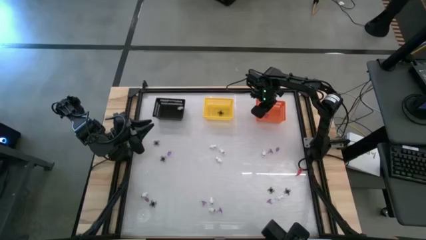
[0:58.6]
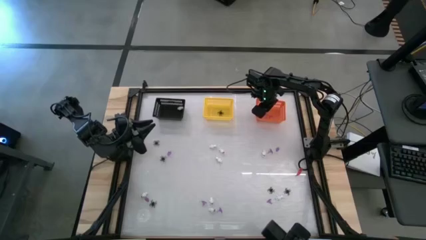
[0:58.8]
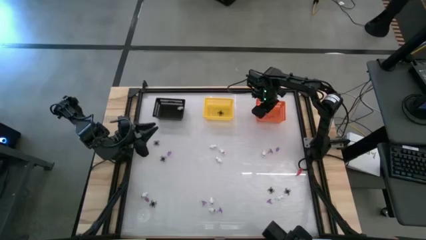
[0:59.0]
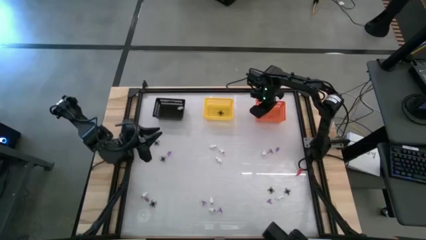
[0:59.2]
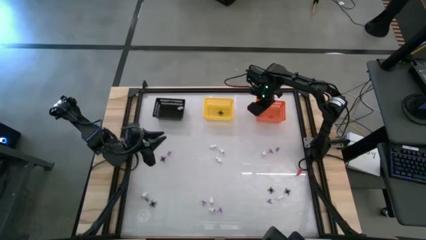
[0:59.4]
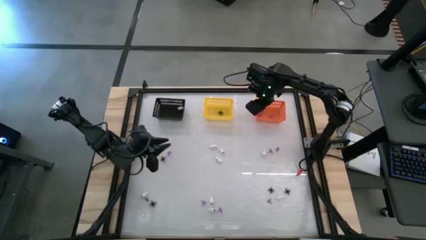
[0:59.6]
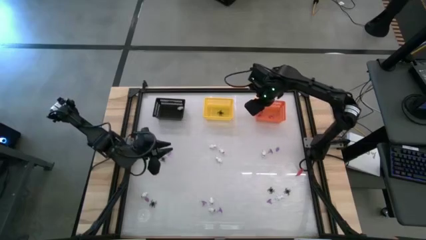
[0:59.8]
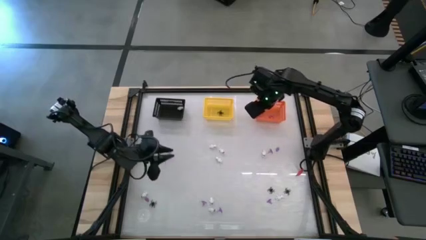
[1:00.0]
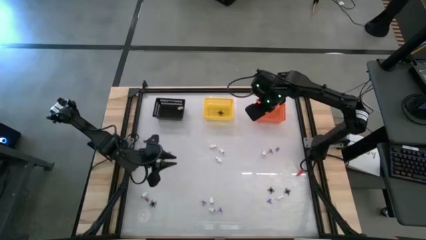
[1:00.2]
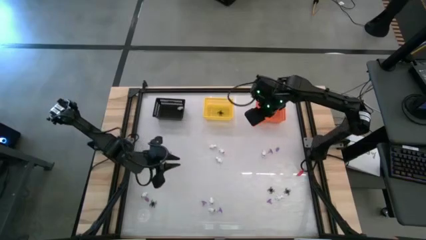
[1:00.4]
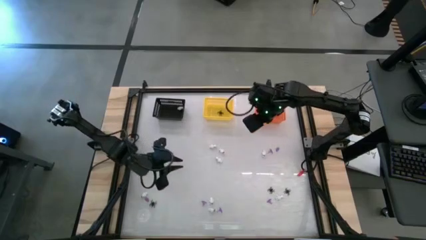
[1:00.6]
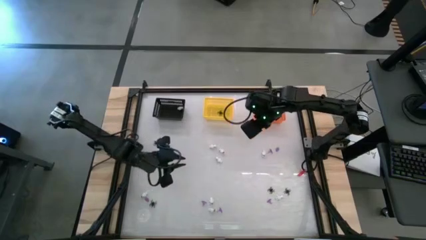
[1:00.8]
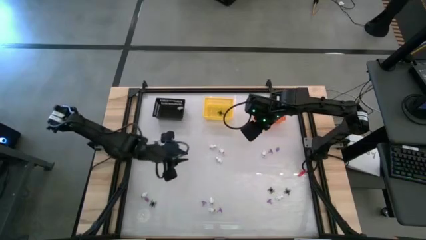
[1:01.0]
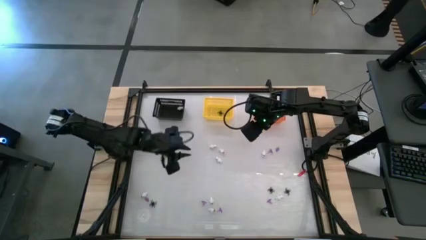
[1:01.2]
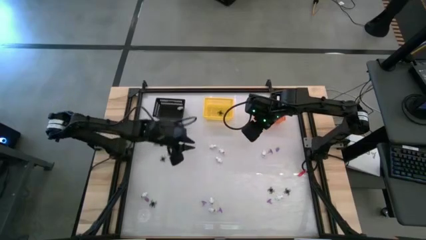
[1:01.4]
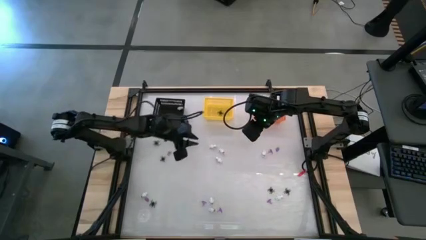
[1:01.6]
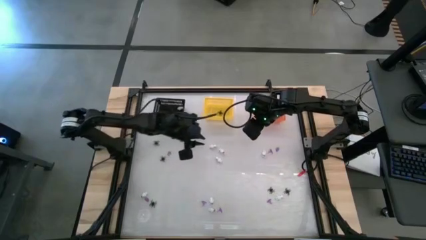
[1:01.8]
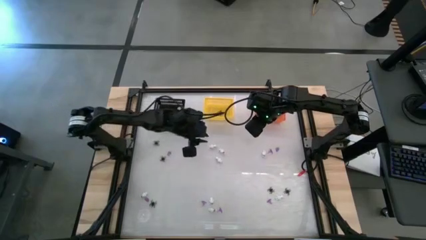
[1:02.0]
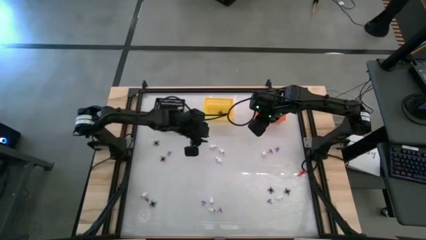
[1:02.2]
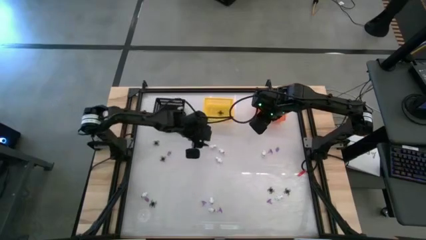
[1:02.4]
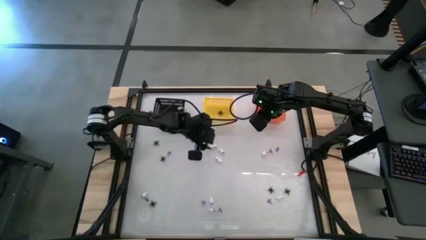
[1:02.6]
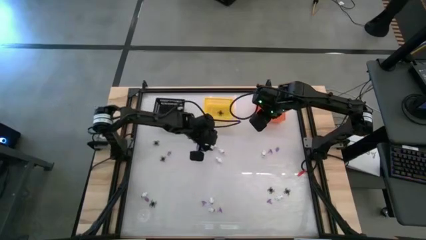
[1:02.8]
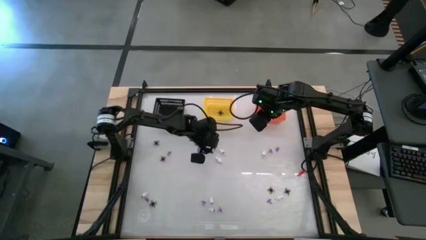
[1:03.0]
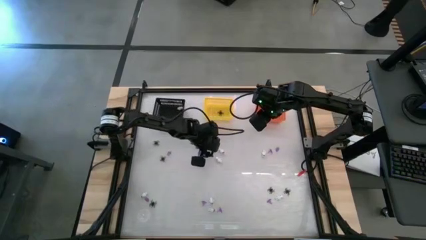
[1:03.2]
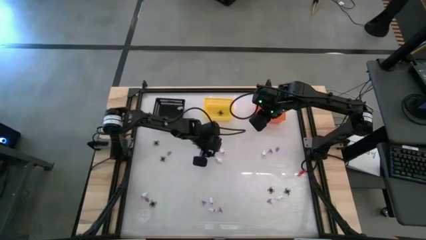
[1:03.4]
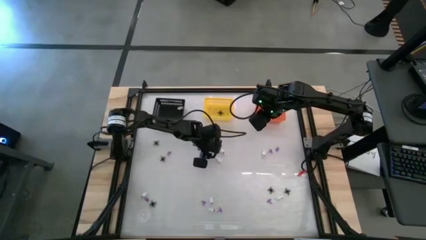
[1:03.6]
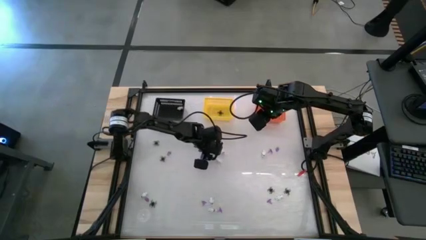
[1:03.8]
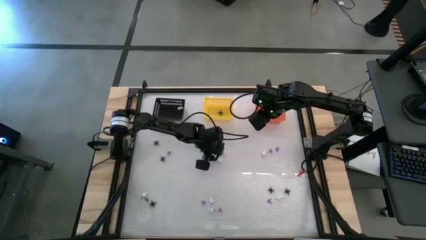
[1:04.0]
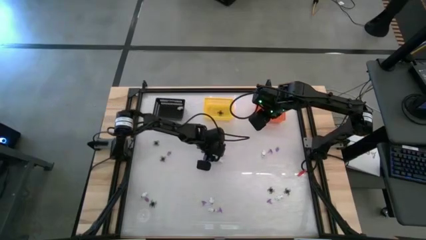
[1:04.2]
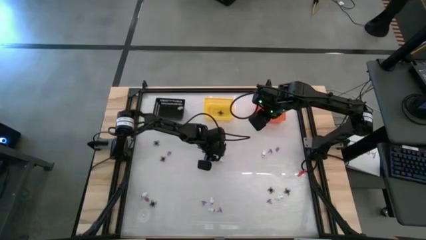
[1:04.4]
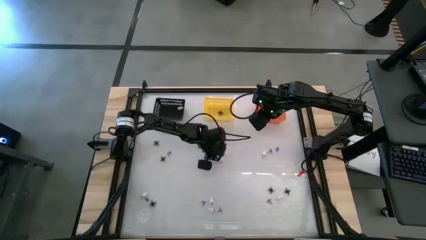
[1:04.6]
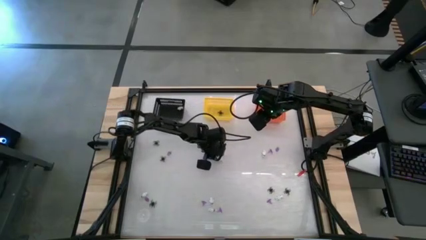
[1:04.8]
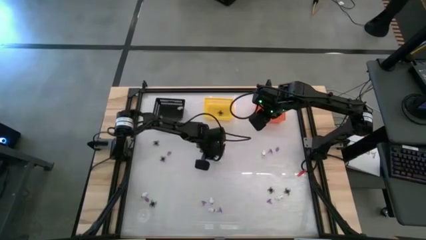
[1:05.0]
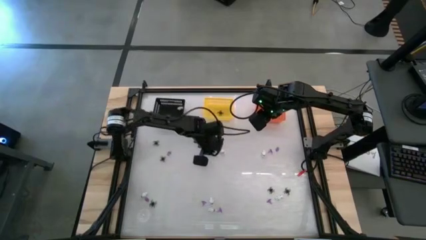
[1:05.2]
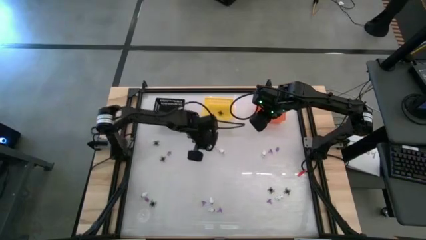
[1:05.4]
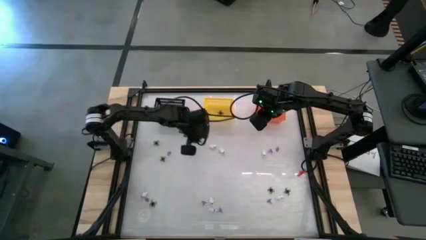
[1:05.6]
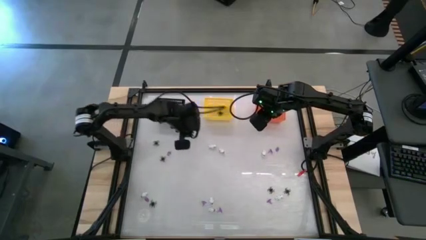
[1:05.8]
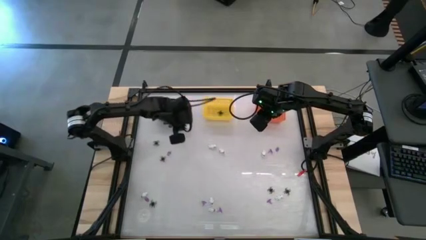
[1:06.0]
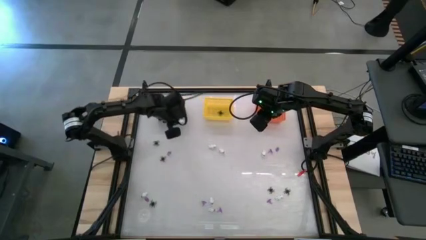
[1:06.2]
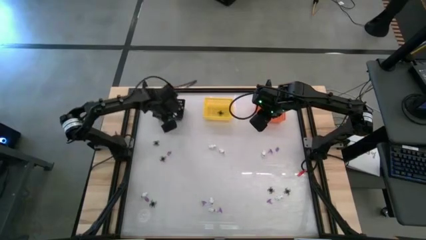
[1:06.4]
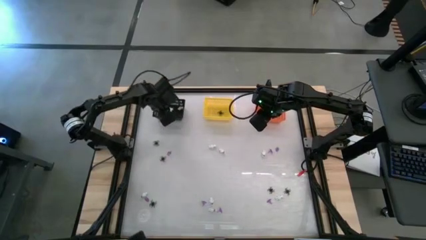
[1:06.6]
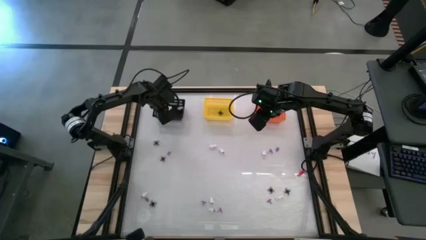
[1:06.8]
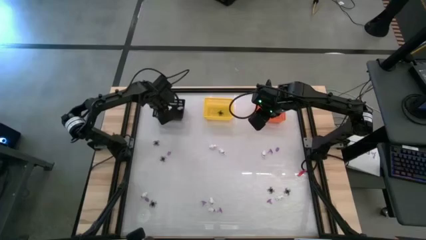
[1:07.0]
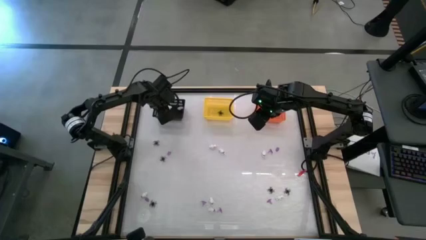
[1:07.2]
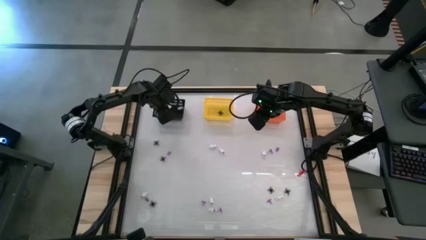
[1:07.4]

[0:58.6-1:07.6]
Task: Sort Halloween decoration
Put the white skeleton toy into the black basket

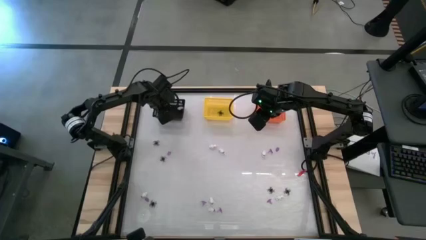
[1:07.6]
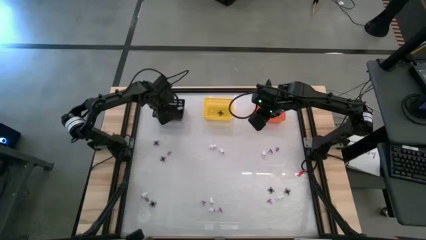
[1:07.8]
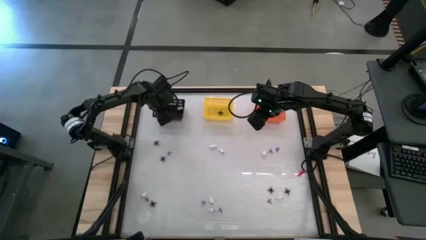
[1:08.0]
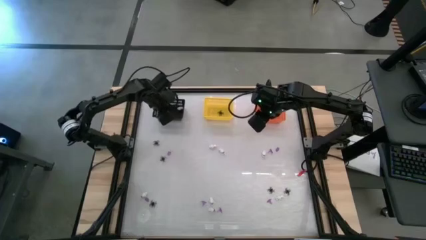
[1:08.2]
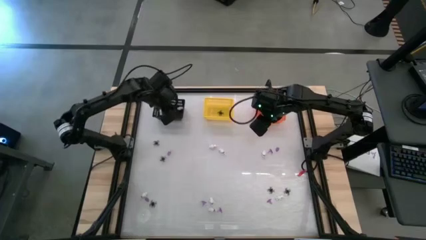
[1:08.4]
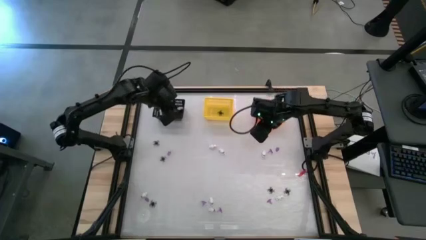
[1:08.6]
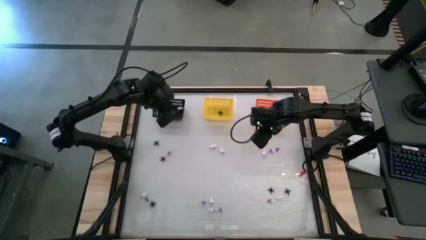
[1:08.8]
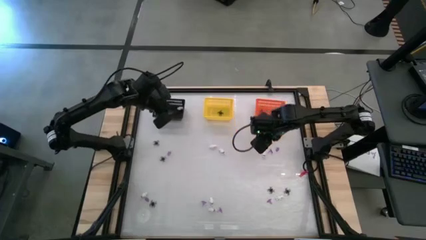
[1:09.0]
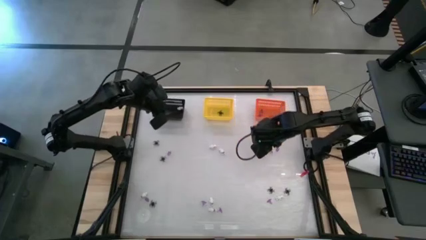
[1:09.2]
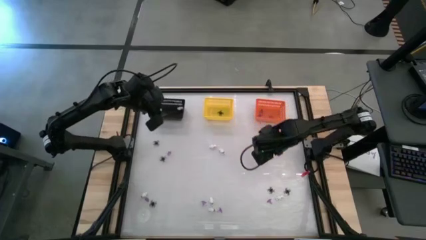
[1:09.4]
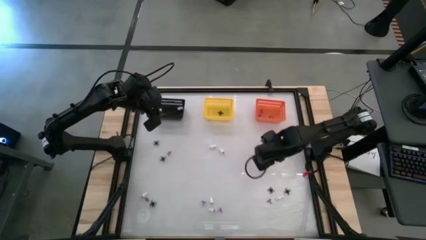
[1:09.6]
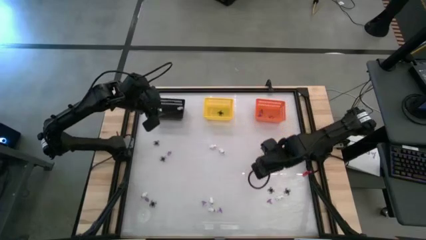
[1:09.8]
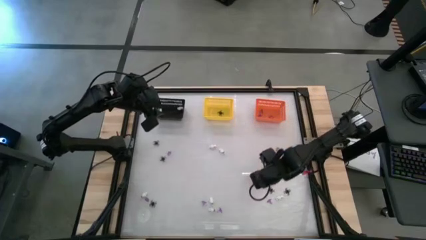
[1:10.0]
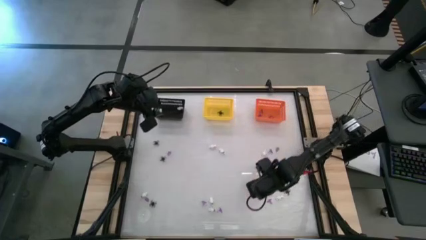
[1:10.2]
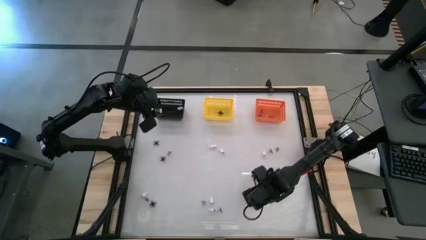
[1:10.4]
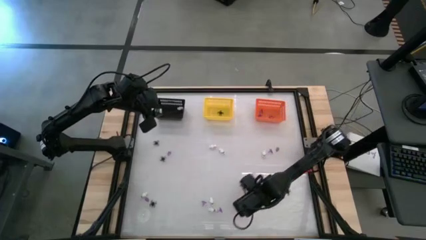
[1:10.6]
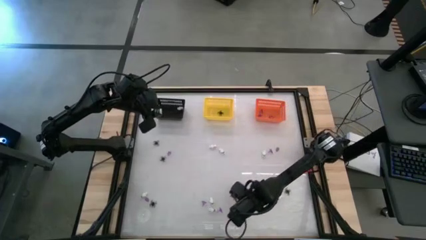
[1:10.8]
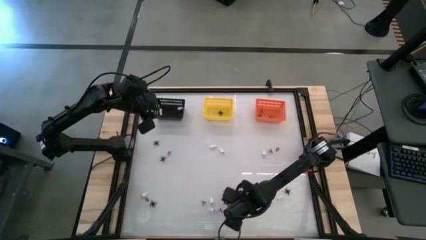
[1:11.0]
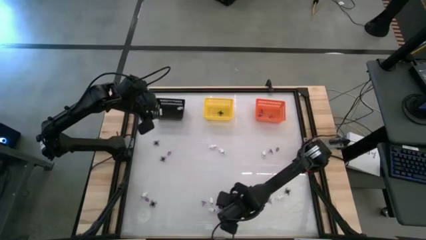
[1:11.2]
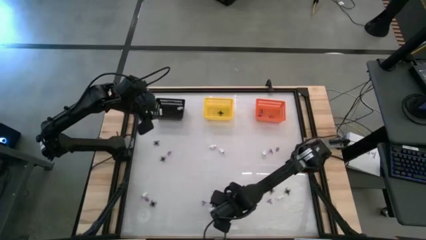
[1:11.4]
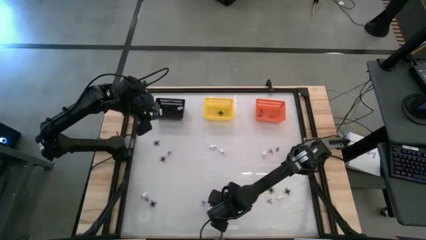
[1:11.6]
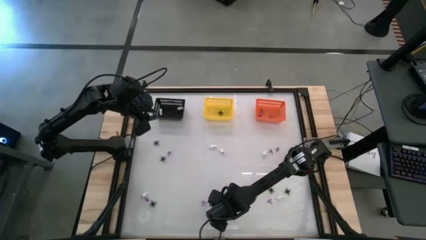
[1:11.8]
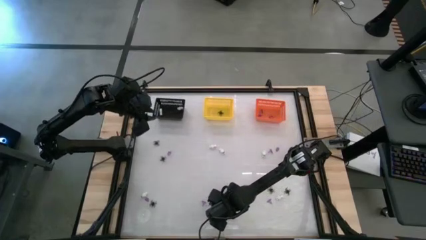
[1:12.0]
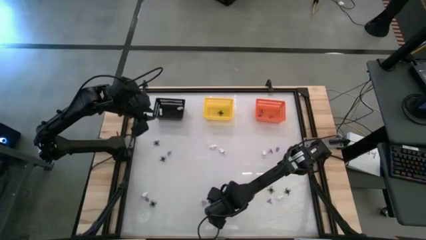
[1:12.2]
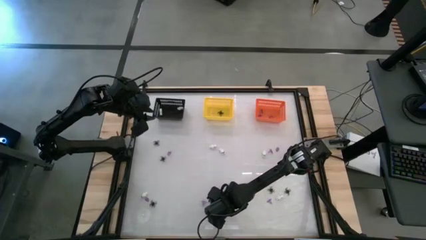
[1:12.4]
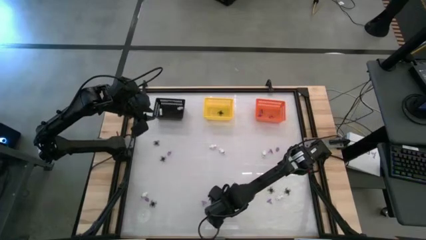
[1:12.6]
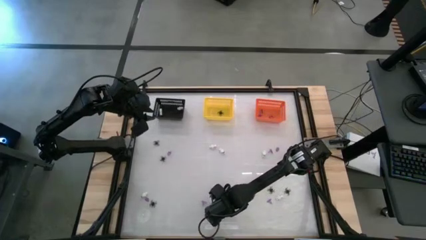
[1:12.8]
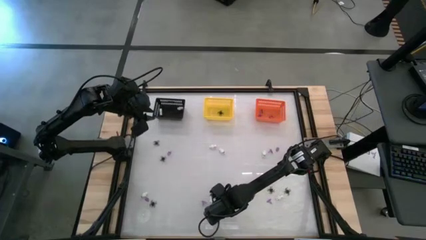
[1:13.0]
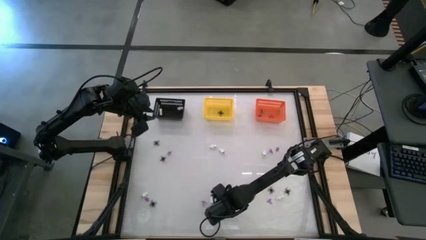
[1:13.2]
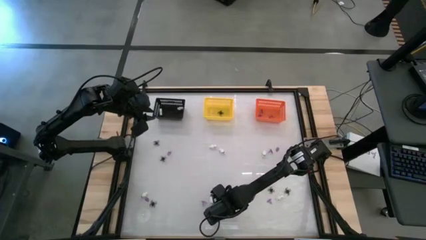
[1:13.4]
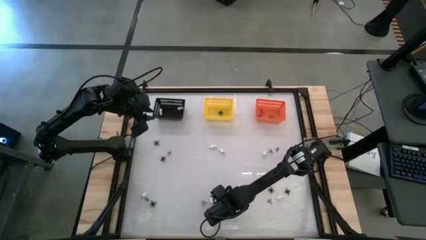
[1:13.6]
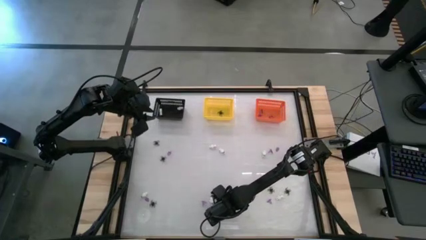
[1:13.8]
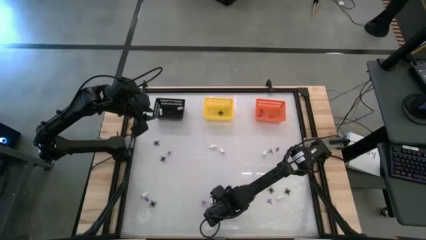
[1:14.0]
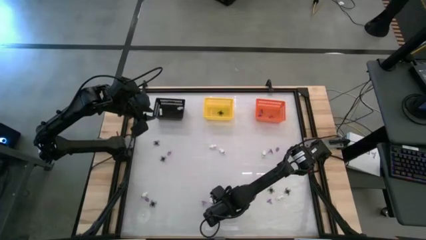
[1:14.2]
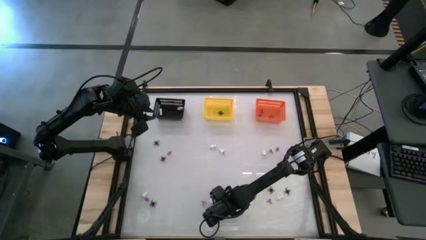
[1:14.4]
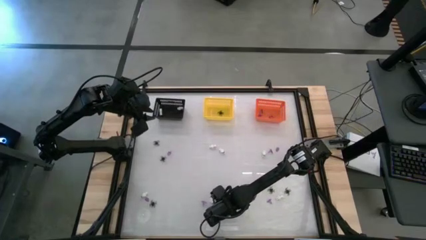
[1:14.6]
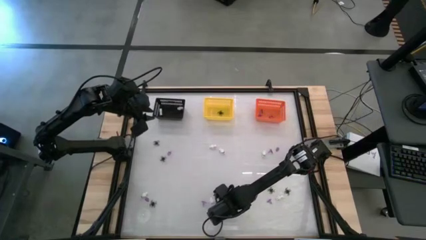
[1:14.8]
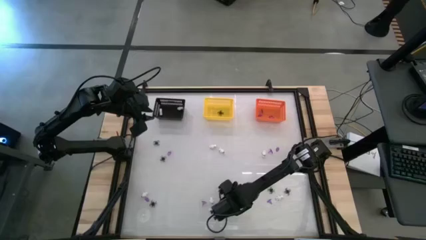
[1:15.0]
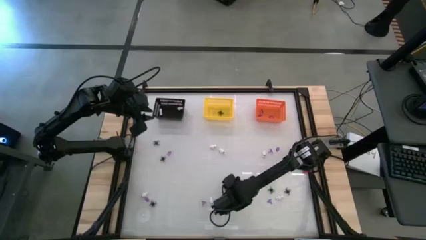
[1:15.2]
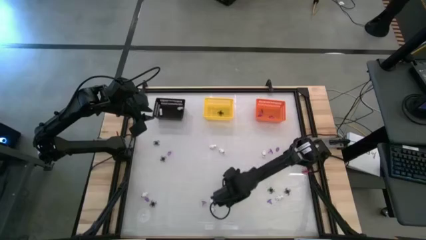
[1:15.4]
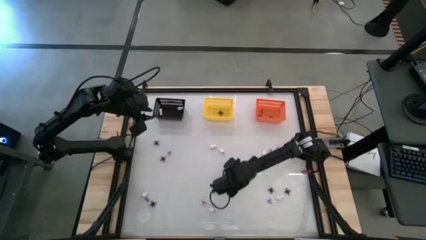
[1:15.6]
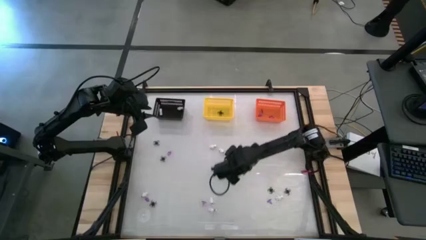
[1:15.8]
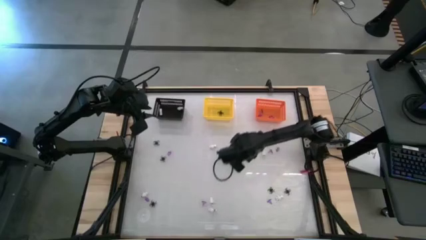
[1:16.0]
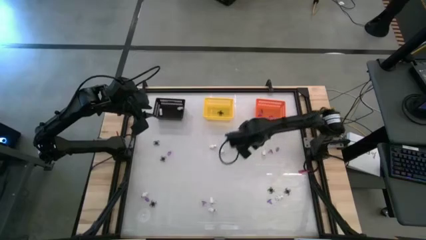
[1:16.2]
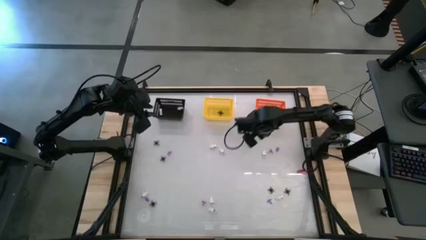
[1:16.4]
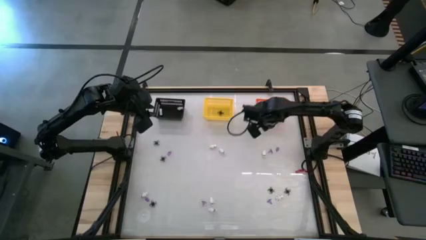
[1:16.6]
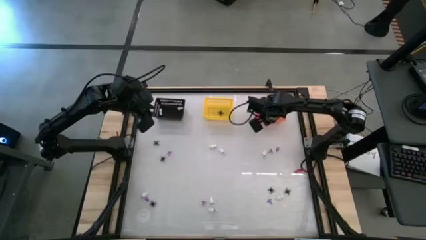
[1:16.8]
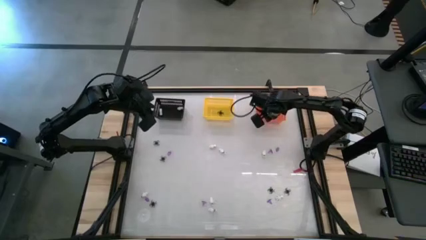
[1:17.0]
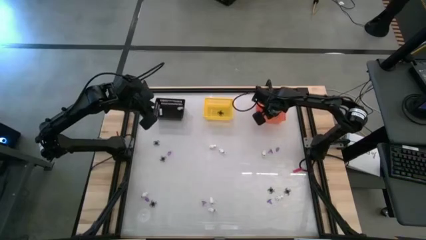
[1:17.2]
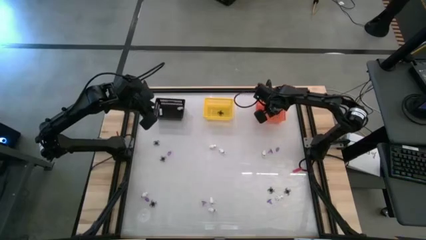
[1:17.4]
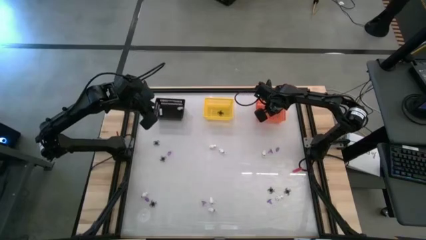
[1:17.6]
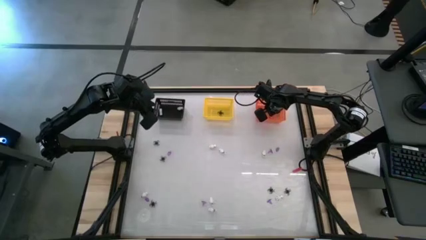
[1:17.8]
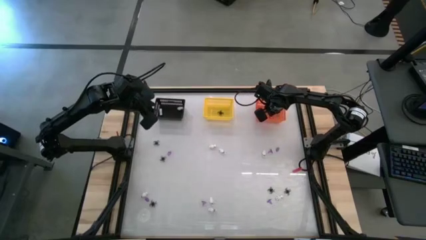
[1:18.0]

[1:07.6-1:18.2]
Put the purple witch hat toy into the orange basket
